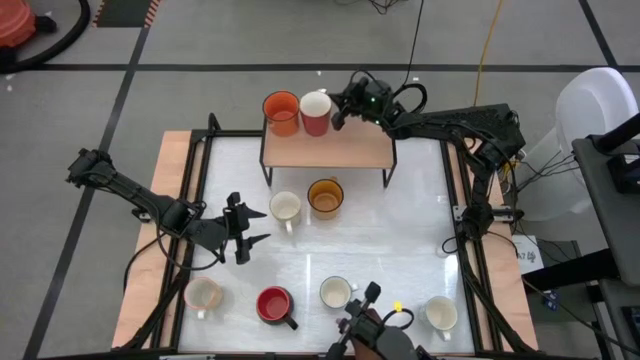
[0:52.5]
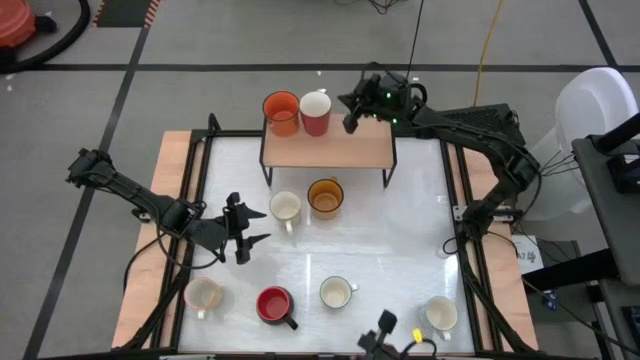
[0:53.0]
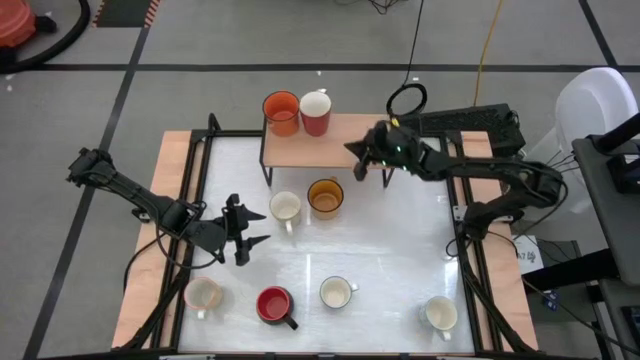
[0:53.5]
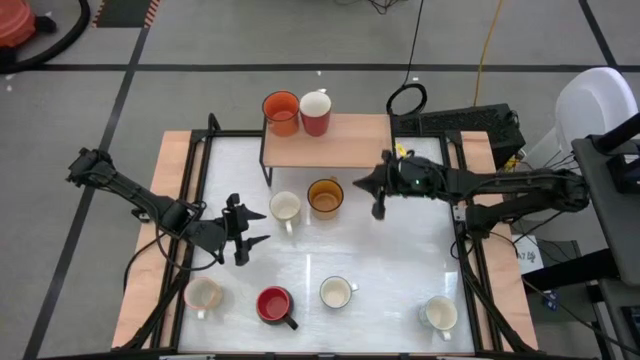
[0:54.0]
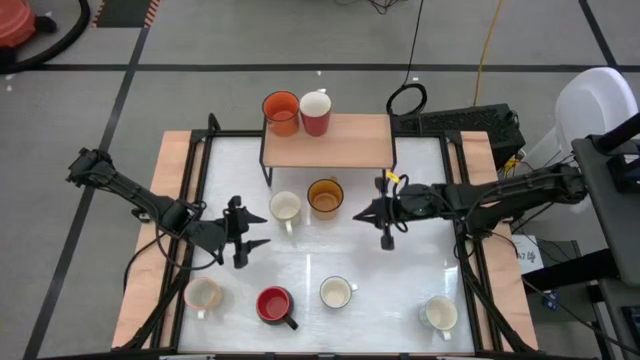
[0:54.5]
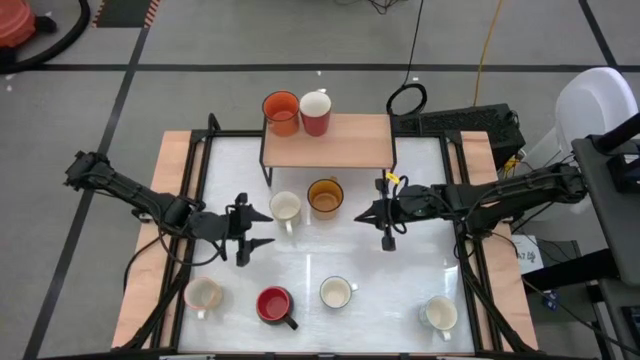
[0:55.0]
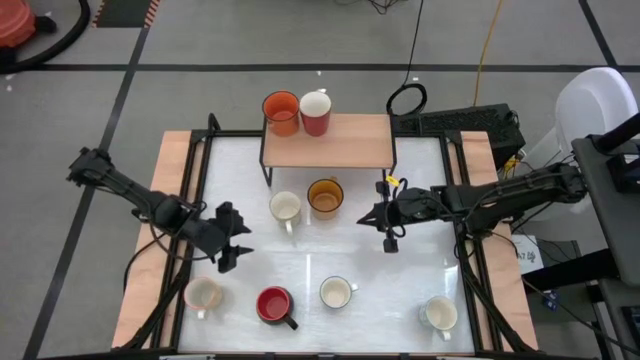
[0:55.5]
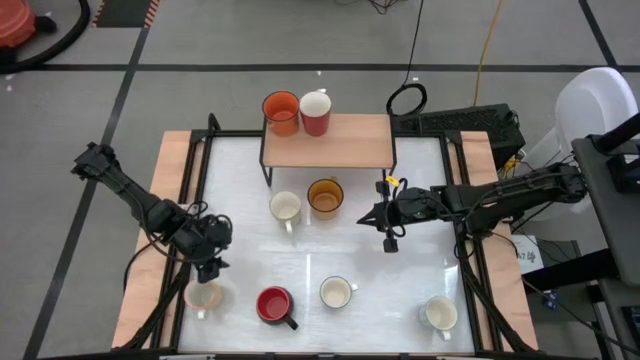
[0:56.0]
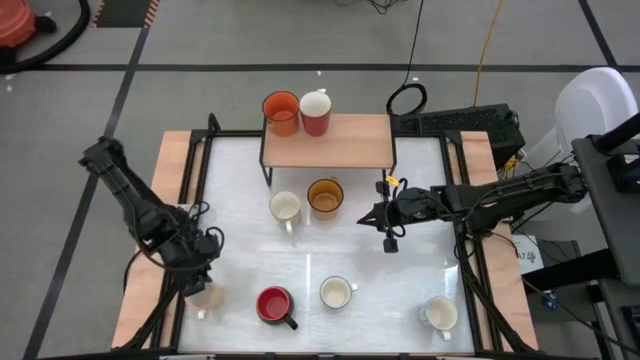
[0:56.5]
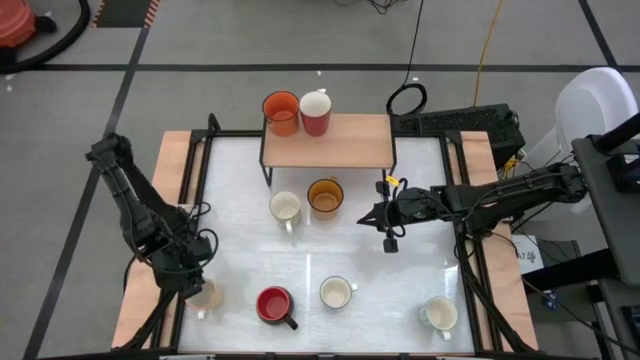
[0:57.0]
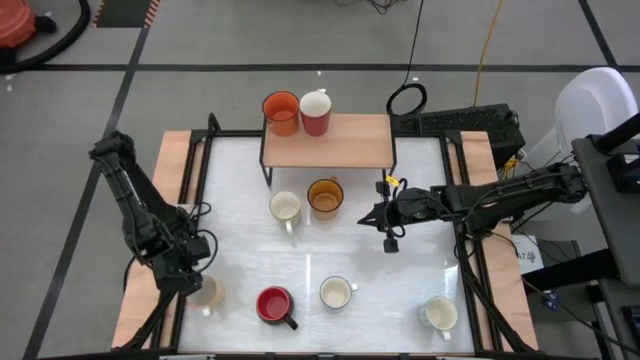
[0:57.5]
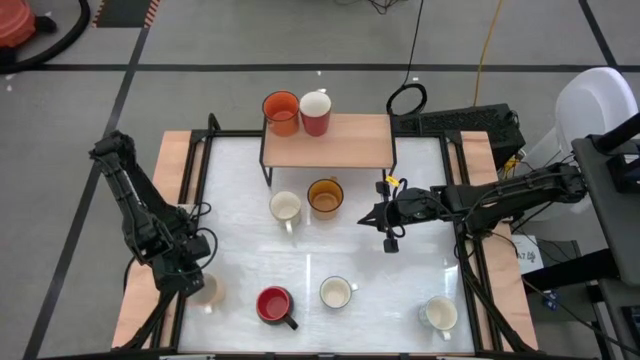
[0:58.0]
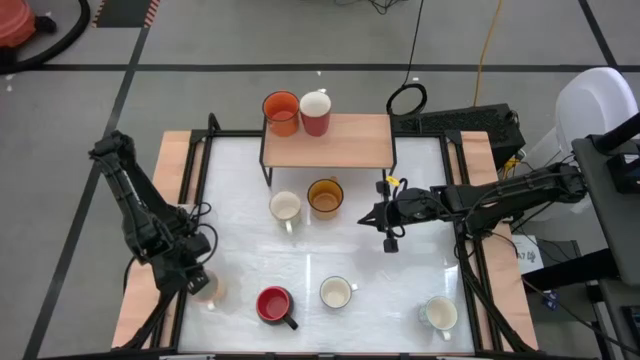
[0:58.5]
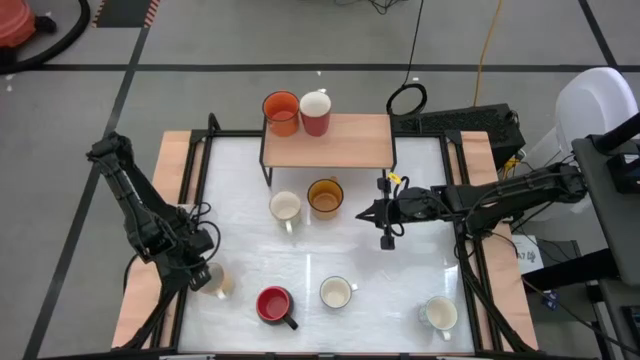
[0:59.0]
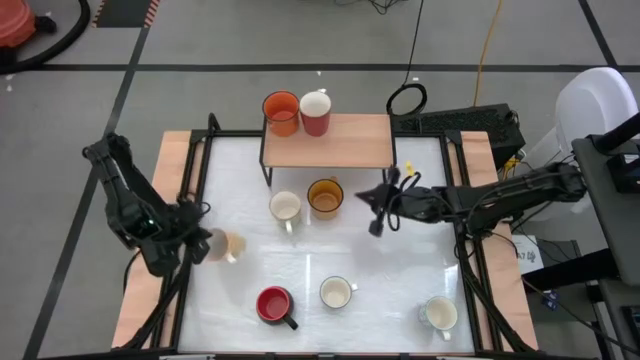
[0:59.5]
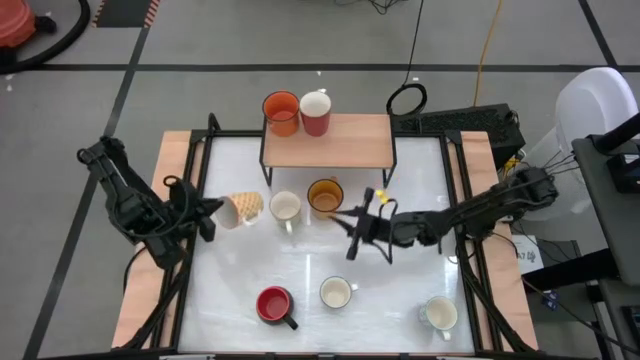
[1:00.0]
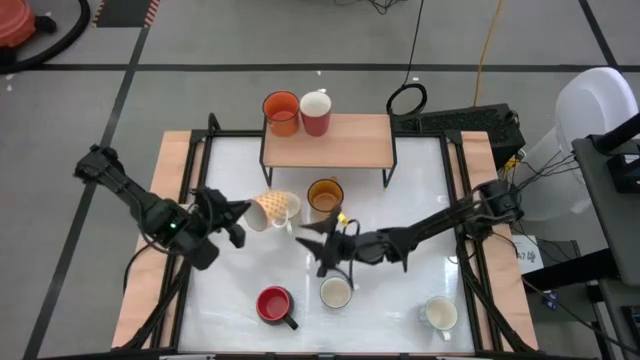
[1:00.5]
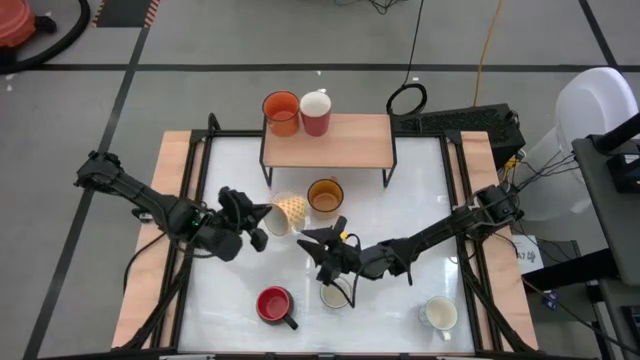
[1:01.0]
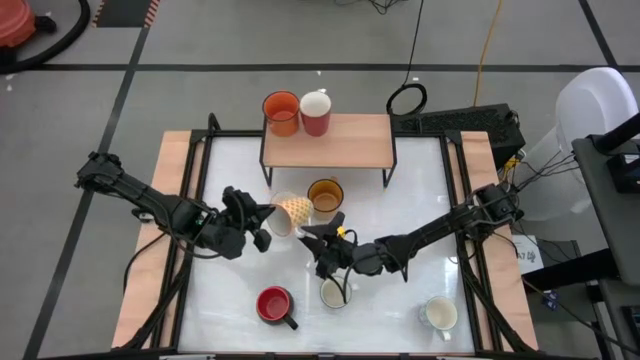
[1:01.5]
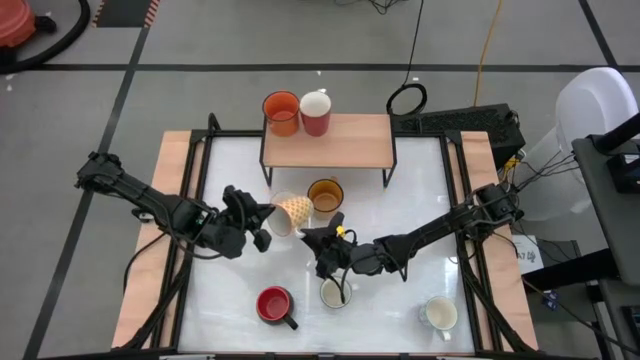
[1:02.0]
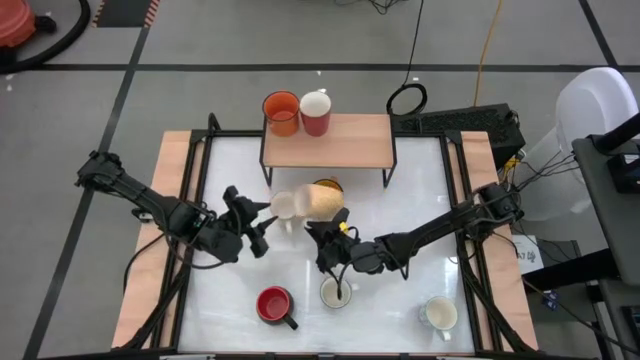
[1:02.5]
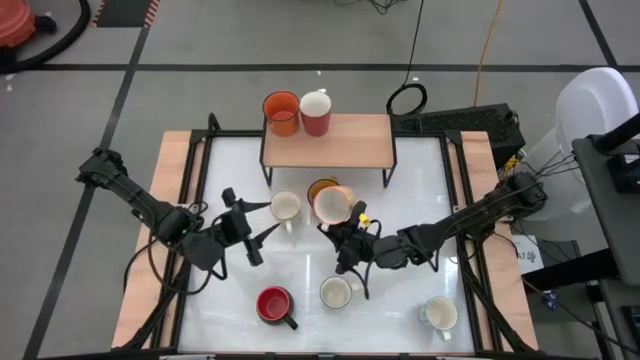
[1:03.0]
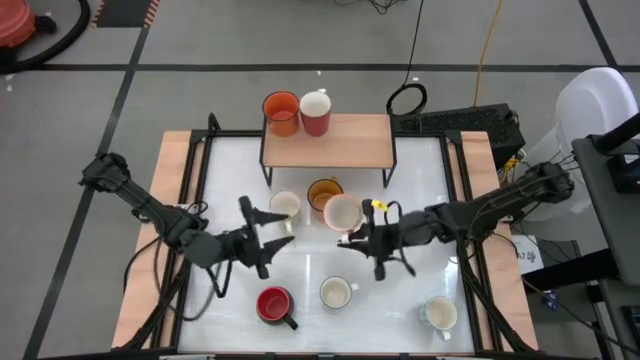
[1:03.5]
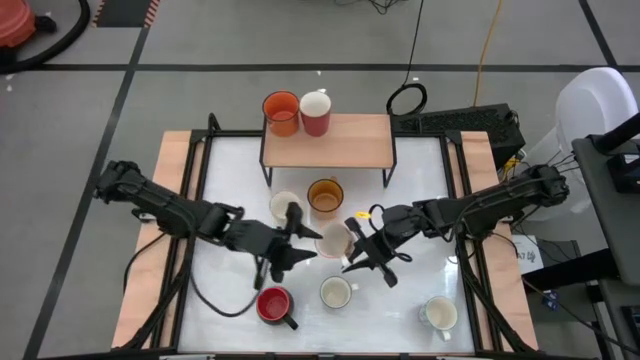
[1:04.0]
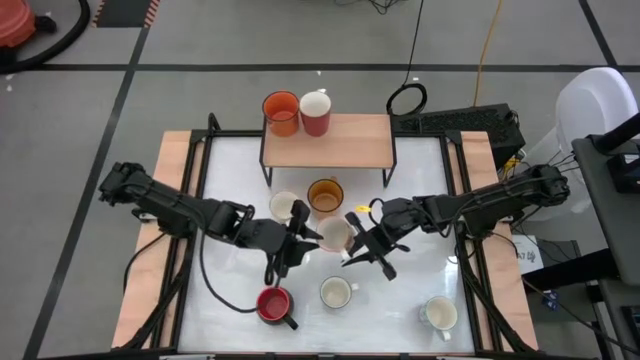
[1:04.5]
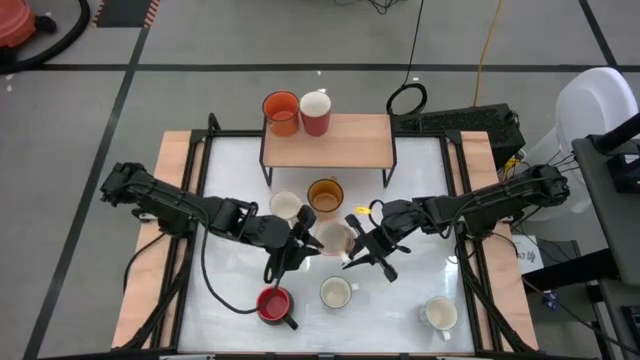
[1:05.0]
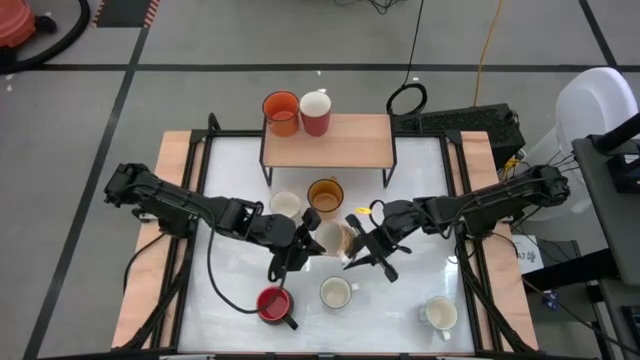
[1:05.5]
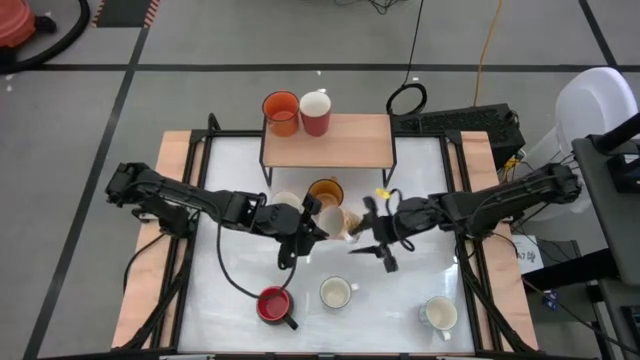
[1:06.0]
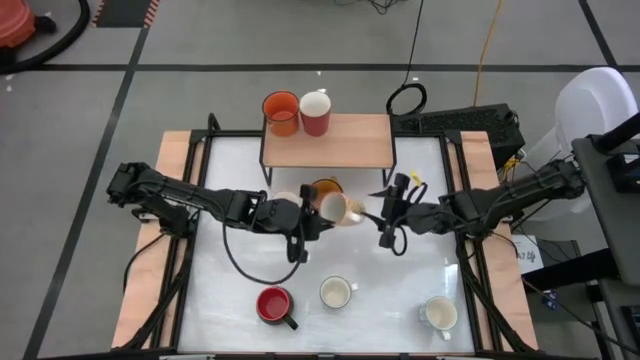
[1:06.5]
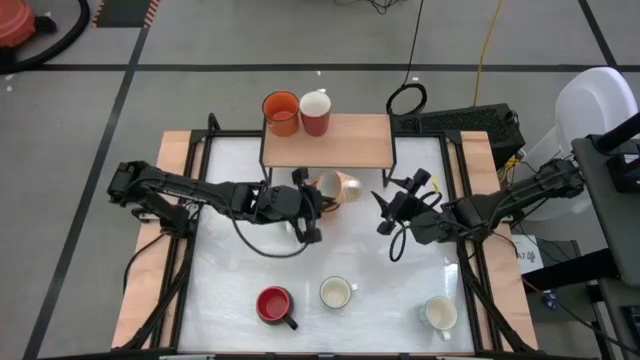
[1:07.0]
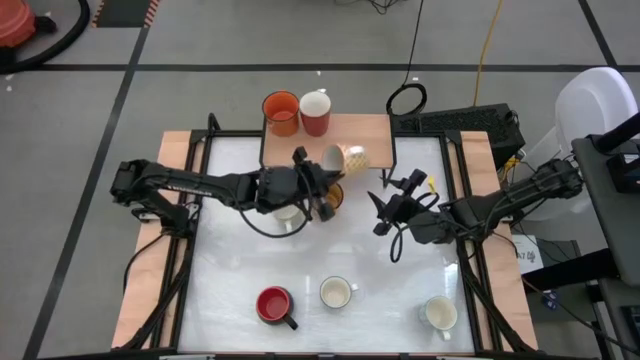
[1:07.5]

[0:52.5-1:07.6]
Task: Place coffee mugs
Put the yellow patterned mug on the shelf

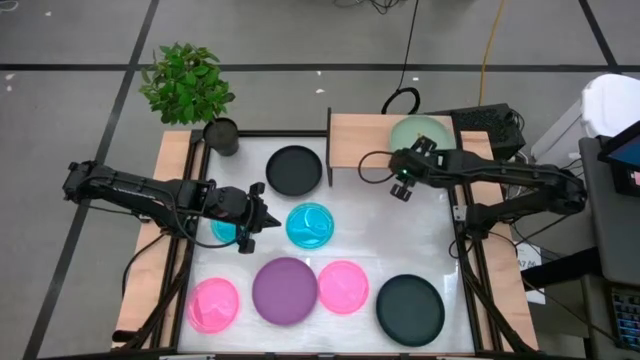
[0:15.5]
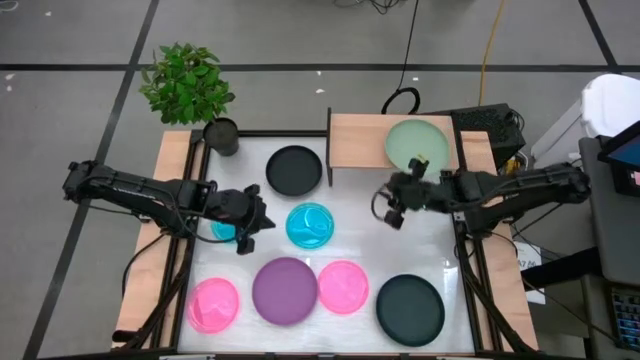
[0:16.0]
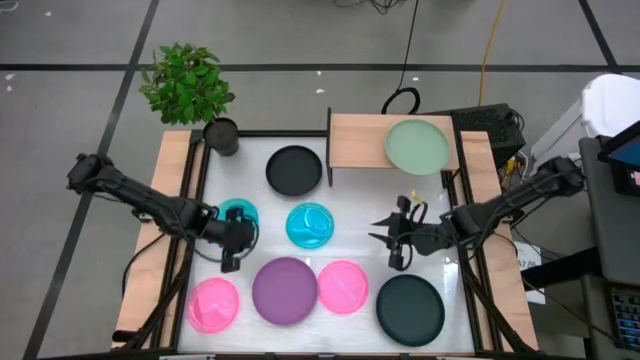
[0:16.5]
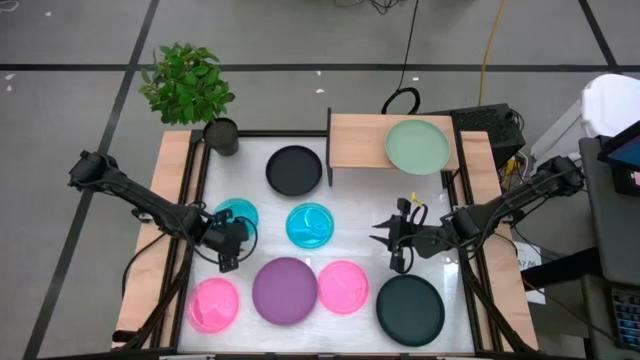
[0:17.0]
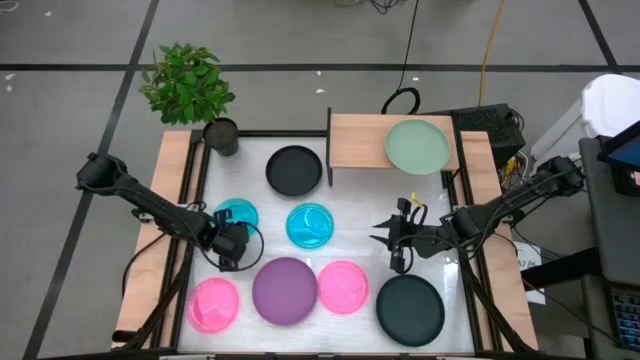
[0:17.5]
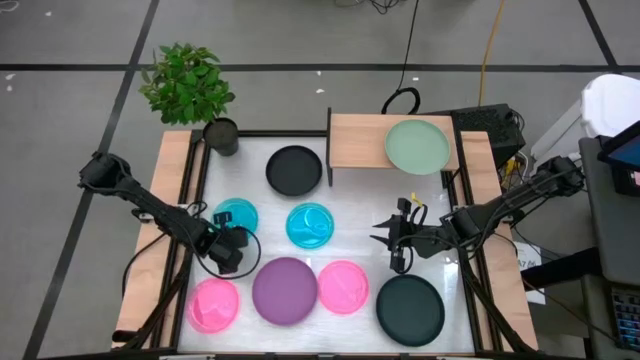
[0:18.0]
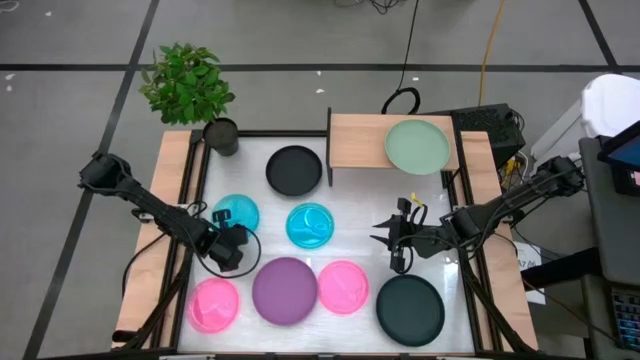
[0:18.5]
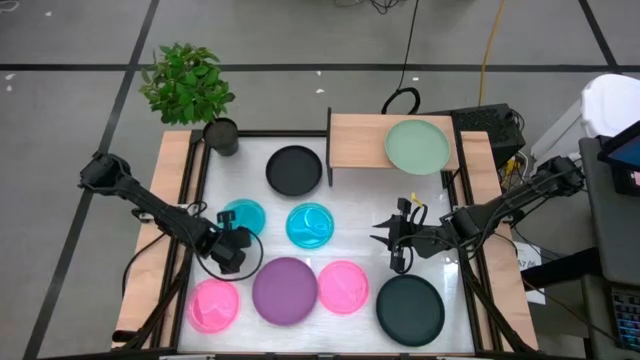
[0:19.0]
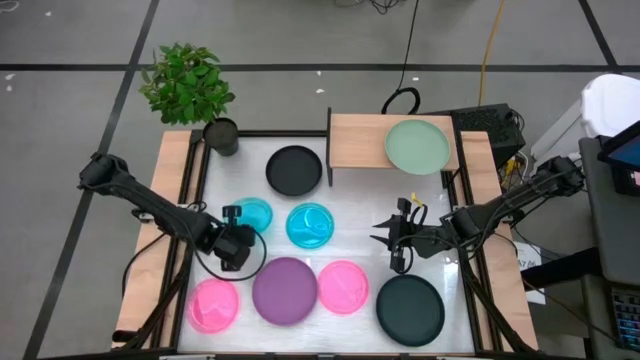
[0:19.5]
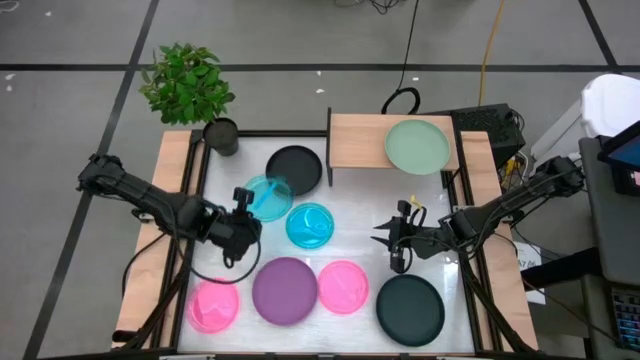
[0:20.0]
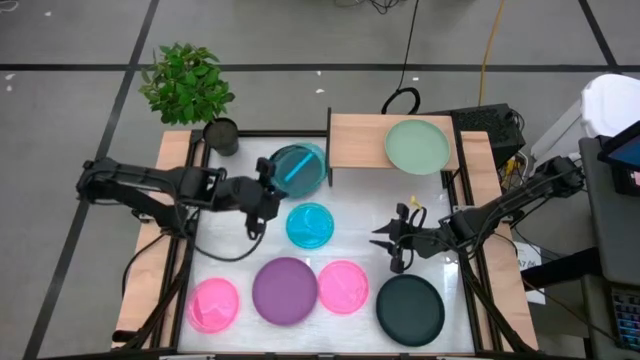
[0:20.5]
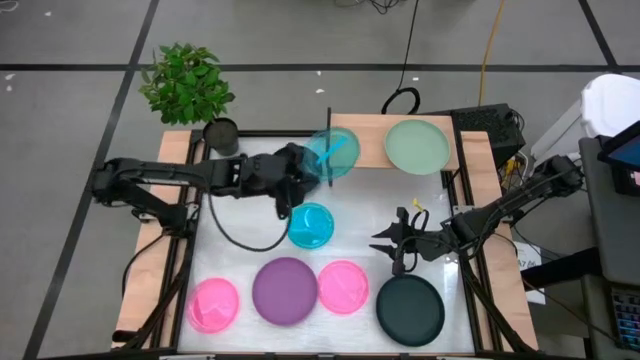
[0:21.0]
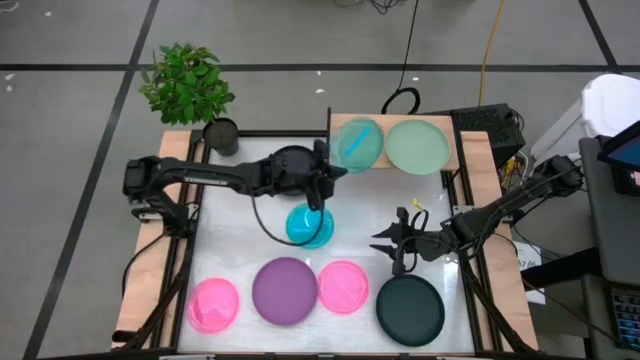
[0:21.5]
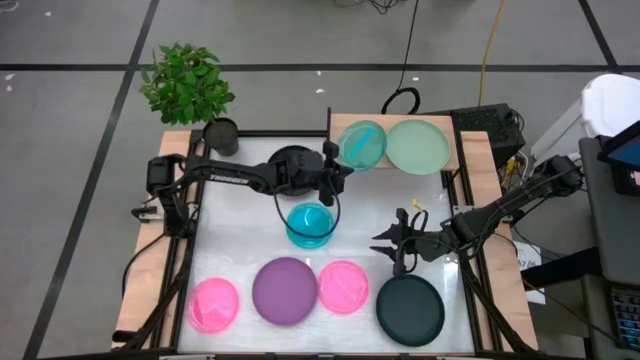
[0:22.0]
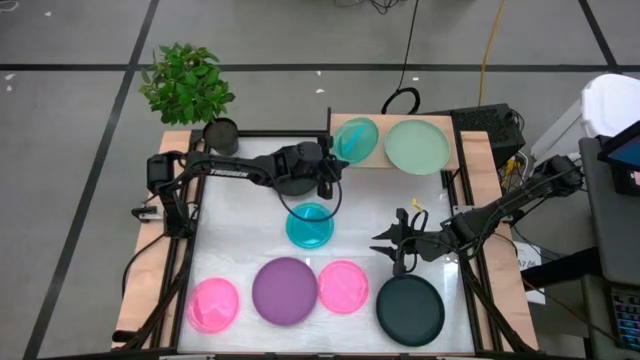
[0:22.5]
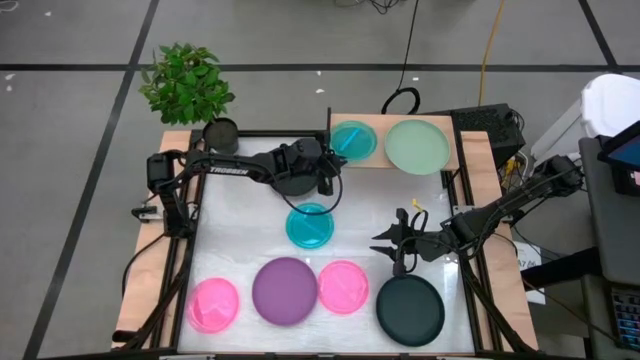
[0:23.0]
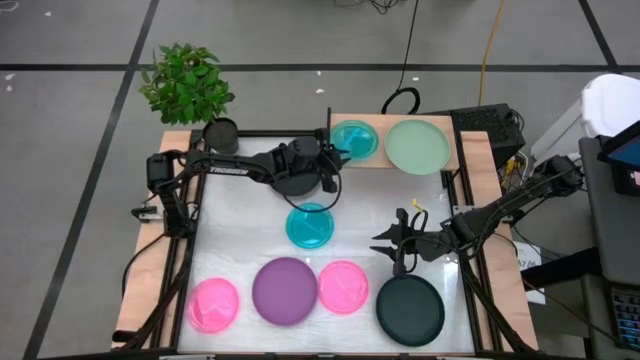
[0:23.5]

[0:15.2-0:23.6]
Task: Place and stack plates onto a shelf
Put the left small blue plate on the shelf
